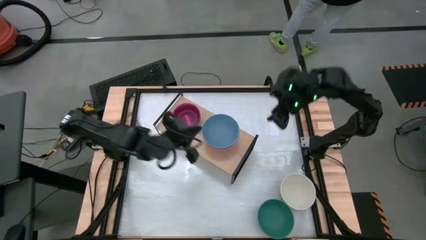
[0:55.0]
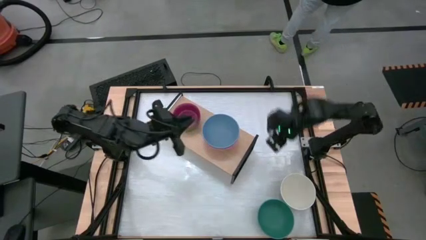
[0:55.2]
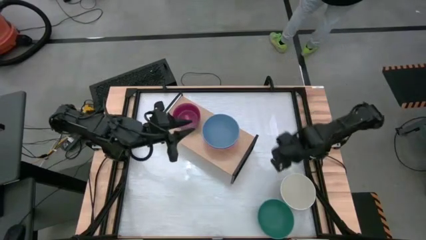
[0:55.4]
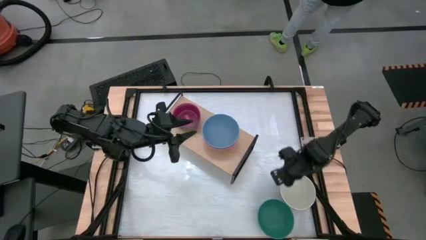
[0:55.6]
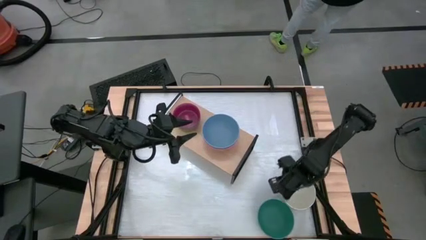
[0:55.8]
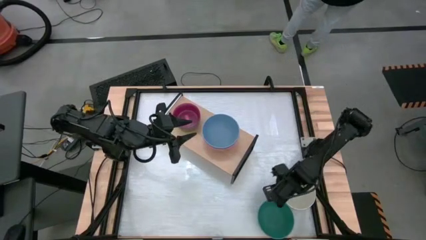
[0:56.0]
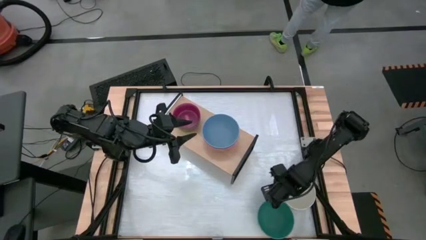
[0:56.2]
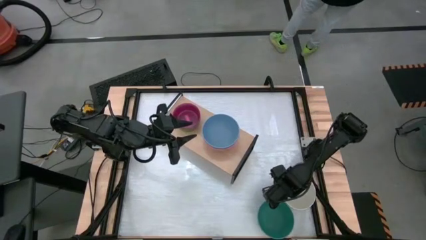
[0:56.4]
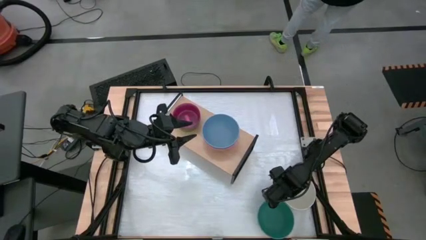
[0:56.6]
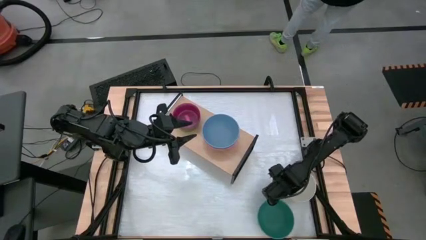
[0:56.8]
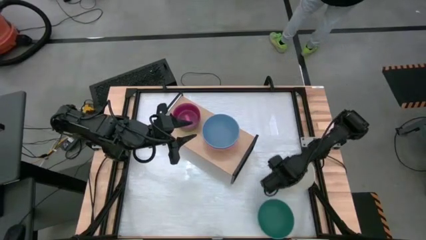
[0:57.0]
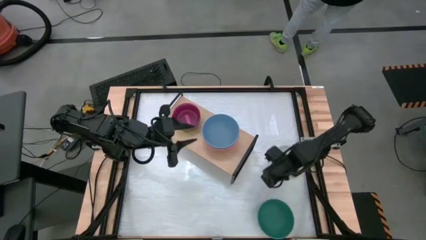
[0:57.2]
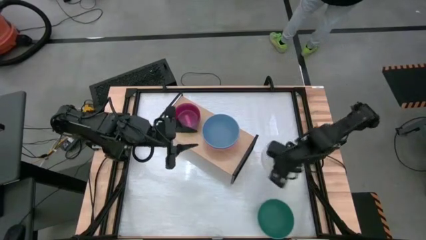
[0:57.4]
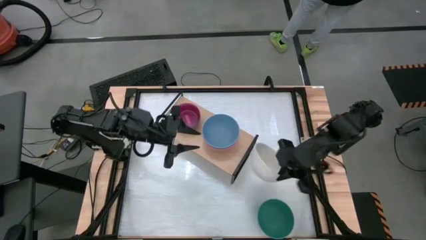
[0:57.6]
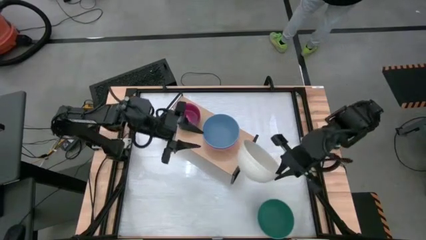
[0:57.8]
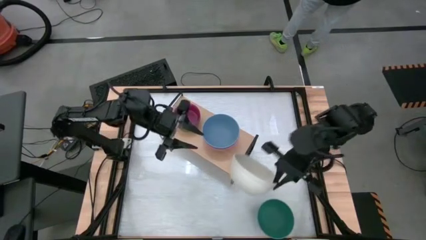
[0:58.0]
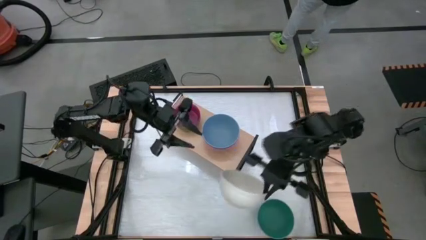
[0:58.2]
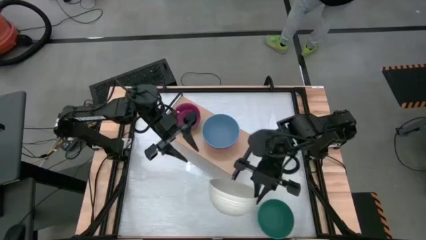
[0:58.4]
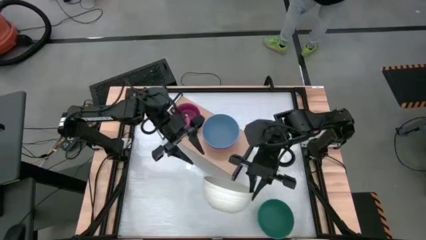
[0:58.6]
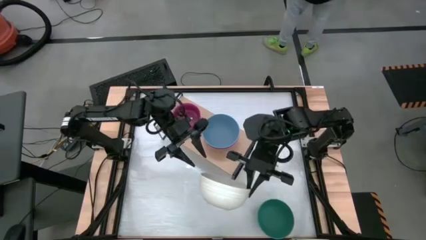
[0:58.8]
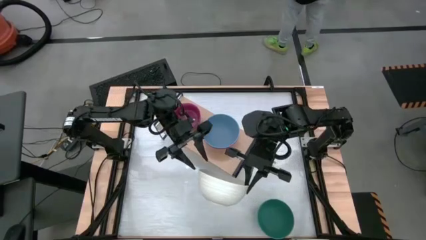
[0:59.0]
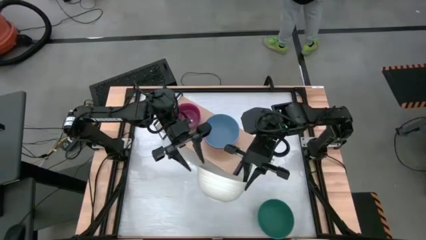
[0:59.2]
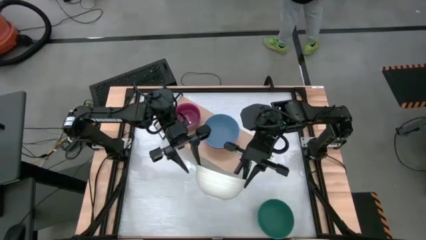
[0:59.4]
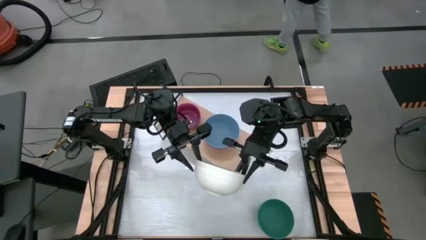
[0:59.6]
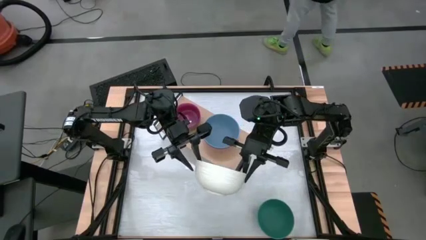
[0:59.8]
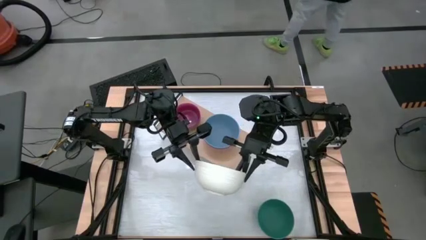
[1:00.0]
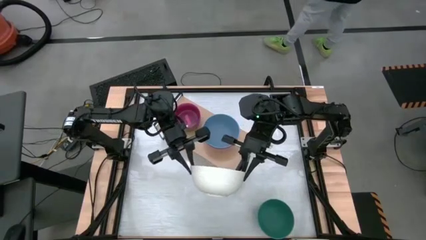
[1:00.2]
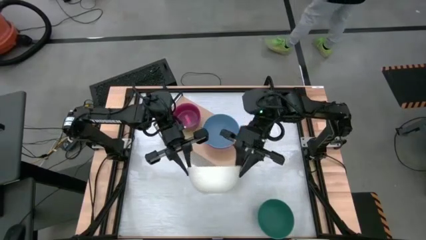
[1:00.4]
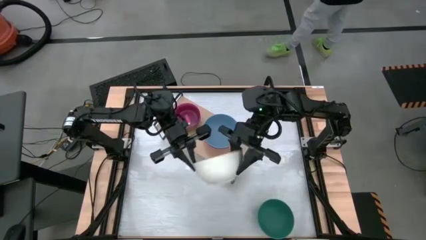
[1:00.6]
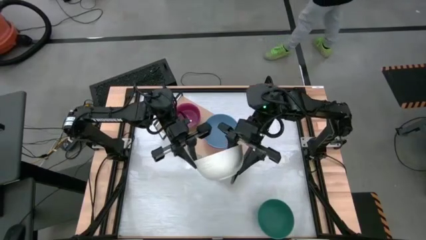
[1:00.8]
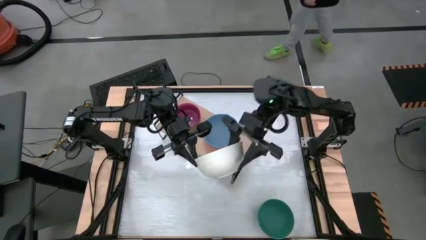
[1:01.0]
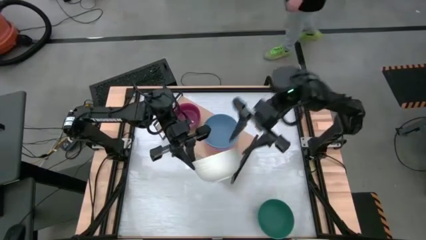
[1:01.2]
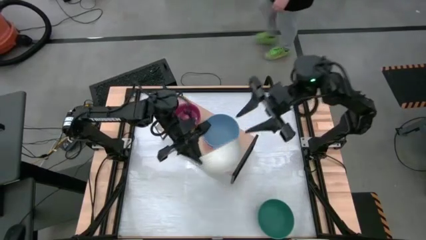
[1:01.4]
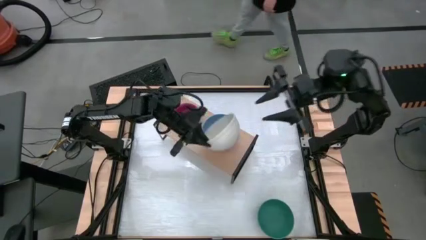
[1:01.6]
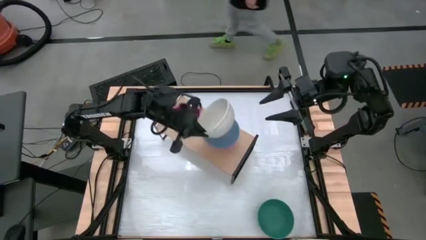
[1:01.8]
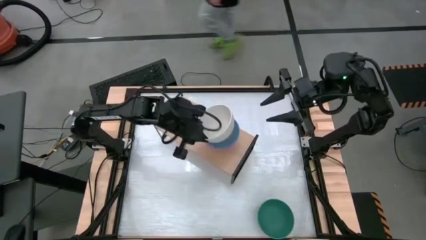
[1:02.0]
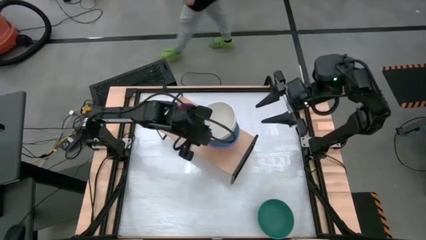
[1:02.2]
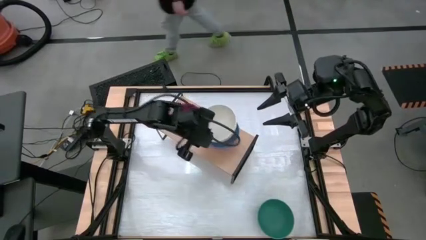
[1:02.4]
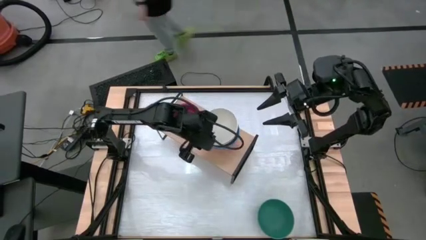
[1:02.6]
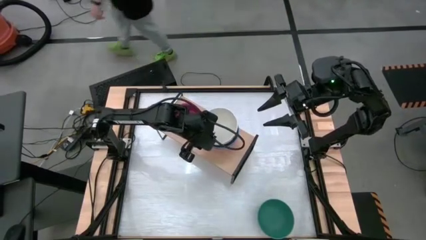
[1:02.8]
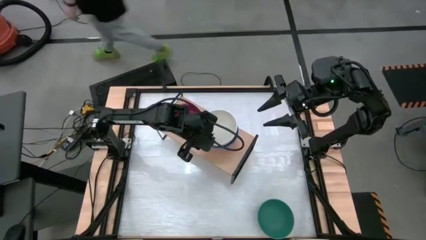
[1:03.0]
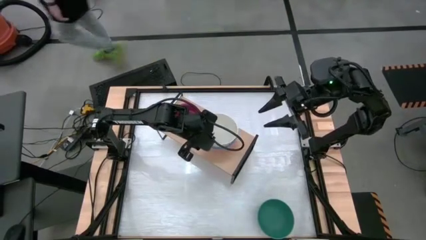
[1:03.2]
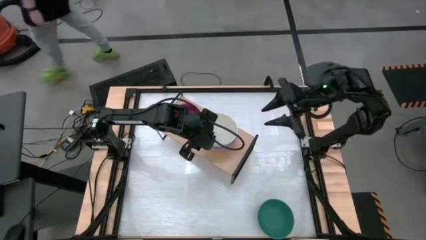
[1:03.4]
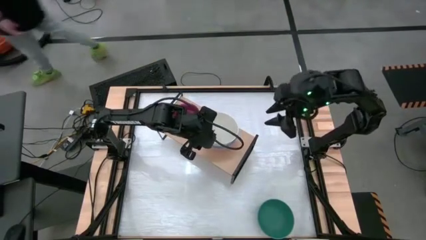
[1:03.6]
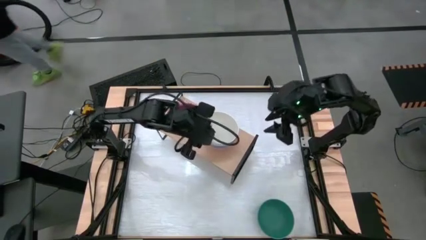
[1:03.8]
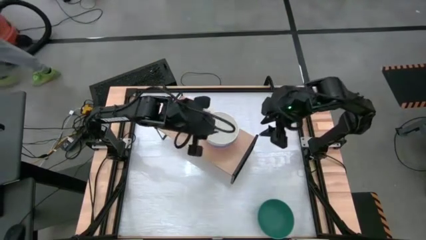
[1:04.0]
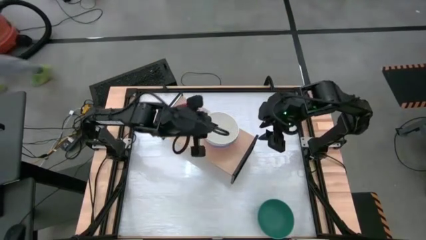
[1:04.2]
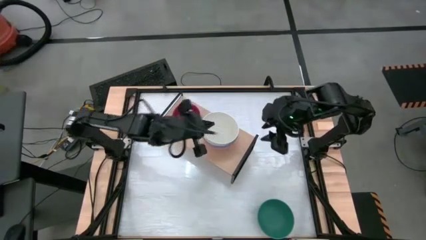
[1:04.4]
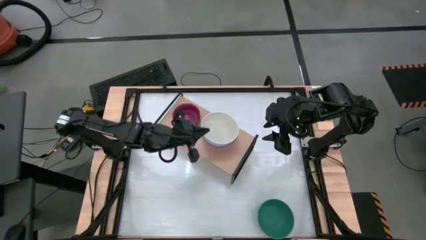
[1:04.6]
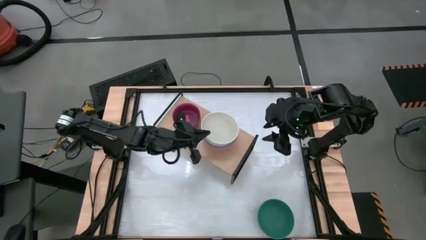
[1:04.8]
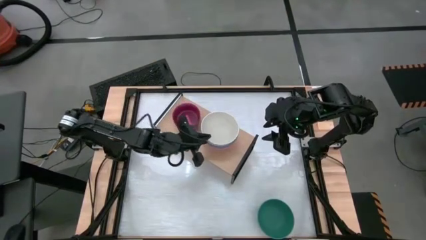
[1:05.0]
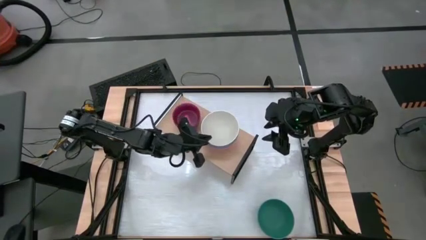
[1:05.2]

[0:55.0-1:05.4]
Task: Place and stack bowls onto a shelf
Stack the large white bowl on the top of the large blue bowl on the shelf
